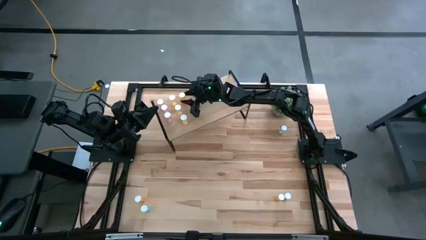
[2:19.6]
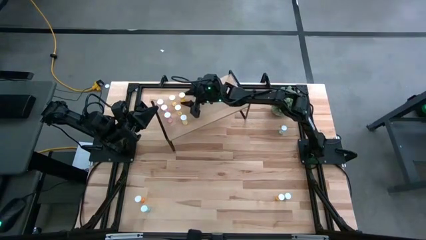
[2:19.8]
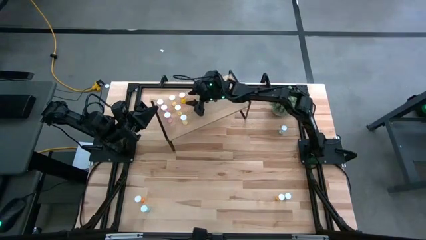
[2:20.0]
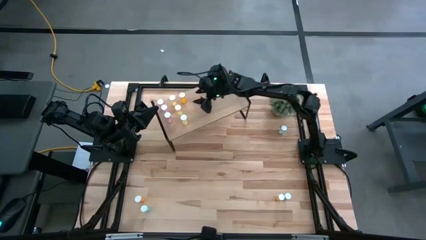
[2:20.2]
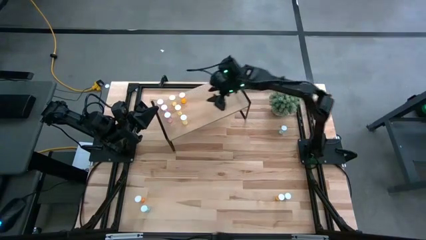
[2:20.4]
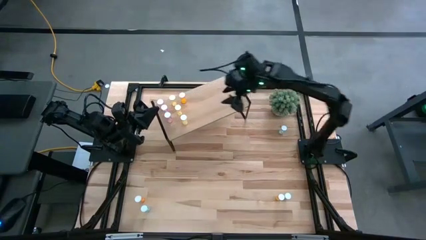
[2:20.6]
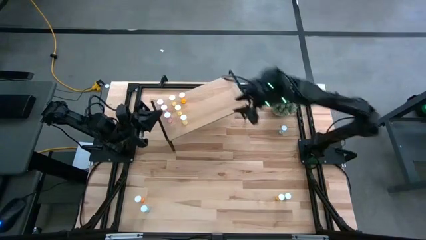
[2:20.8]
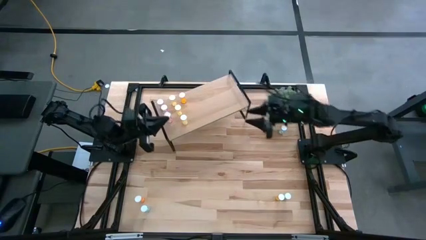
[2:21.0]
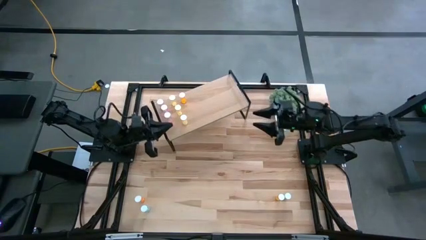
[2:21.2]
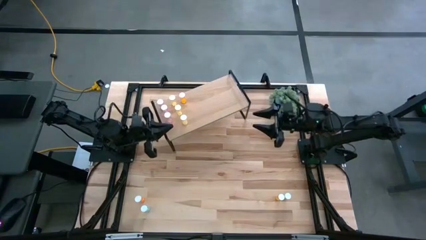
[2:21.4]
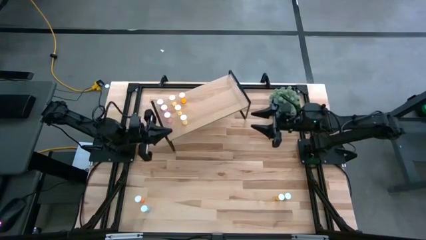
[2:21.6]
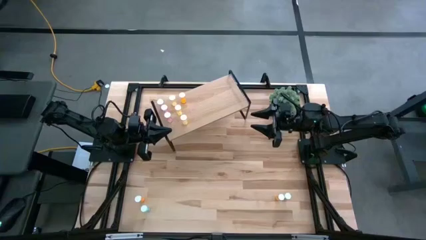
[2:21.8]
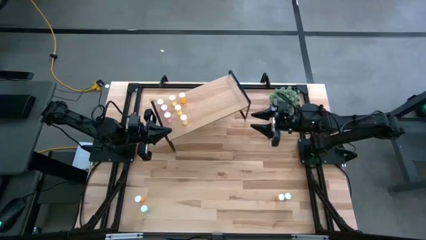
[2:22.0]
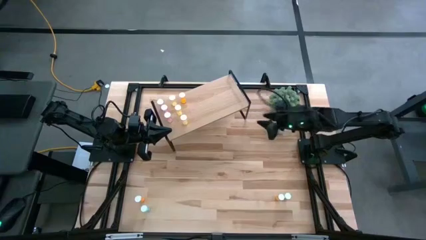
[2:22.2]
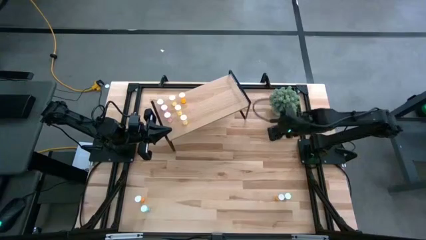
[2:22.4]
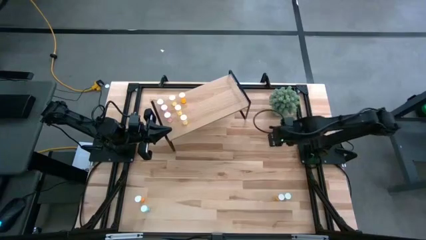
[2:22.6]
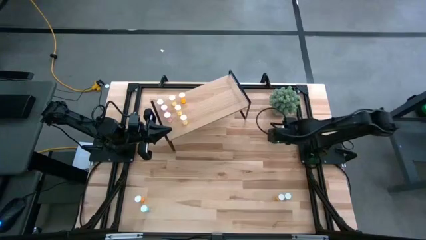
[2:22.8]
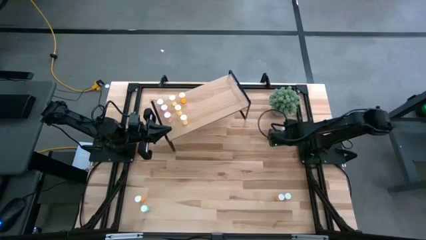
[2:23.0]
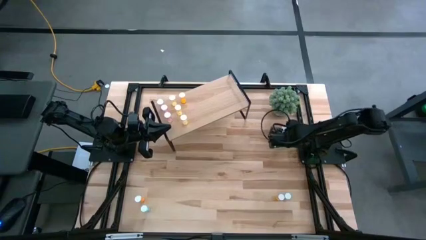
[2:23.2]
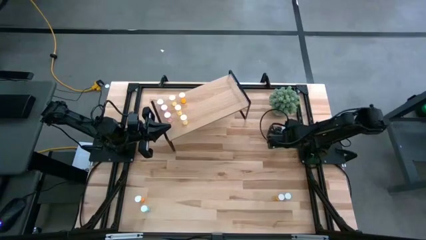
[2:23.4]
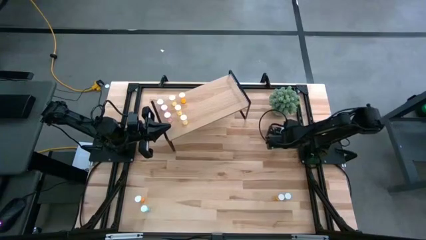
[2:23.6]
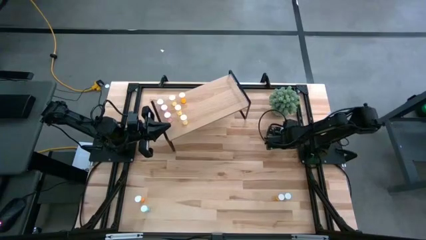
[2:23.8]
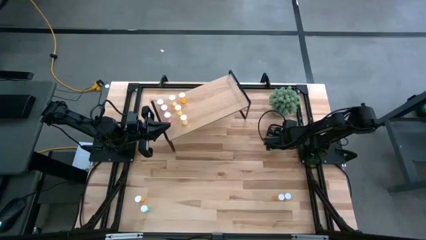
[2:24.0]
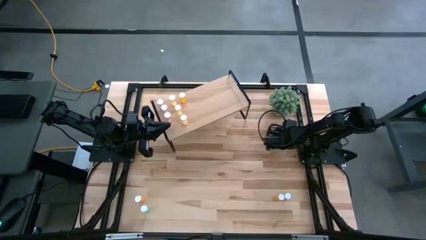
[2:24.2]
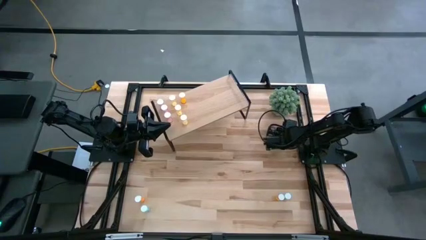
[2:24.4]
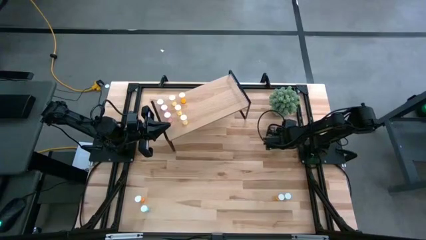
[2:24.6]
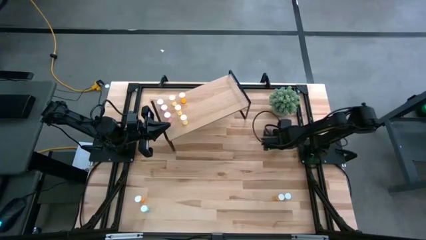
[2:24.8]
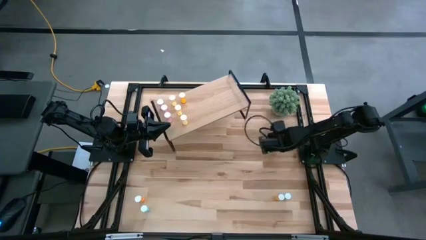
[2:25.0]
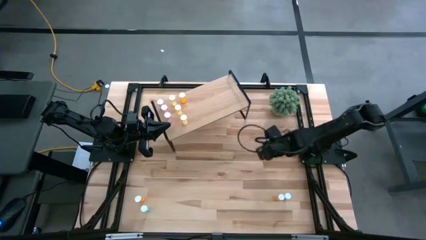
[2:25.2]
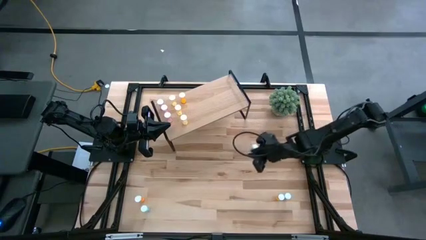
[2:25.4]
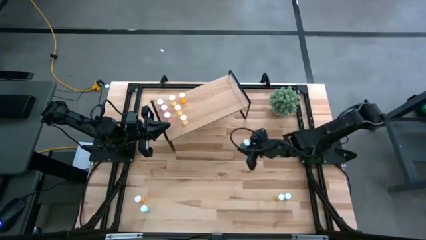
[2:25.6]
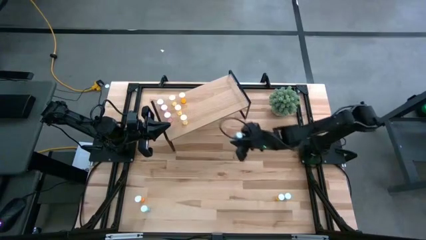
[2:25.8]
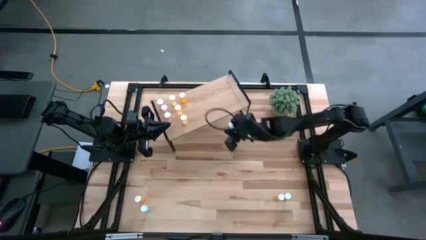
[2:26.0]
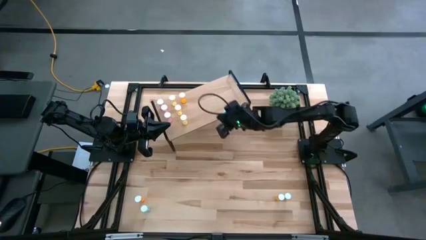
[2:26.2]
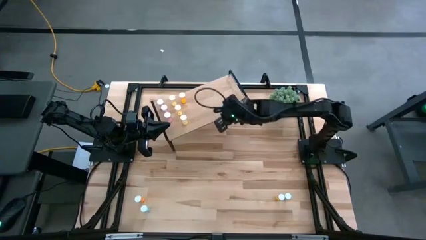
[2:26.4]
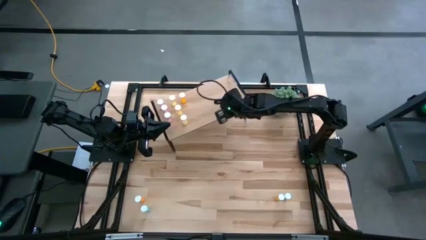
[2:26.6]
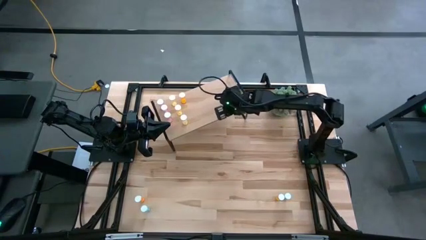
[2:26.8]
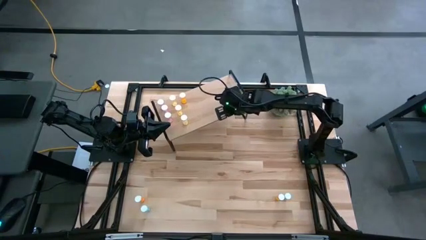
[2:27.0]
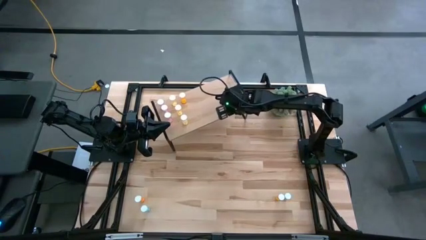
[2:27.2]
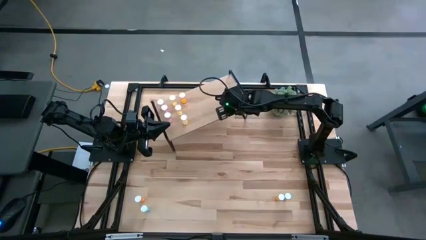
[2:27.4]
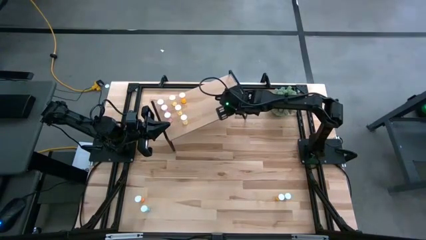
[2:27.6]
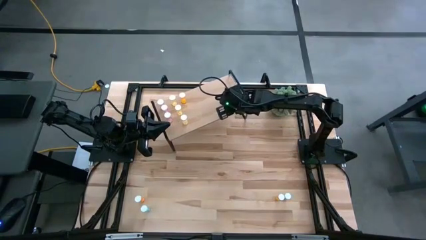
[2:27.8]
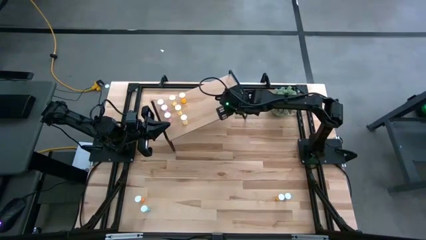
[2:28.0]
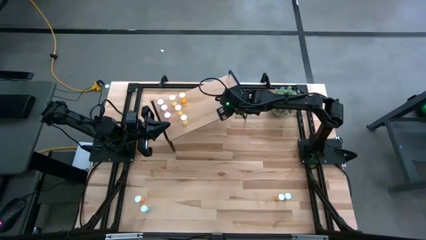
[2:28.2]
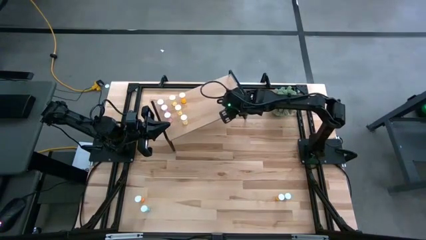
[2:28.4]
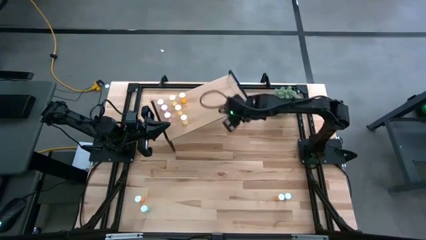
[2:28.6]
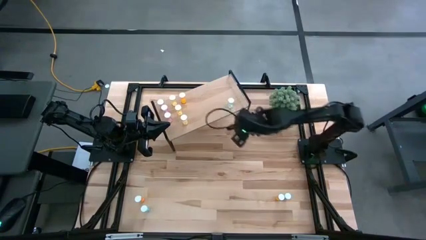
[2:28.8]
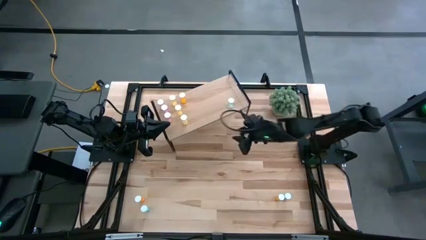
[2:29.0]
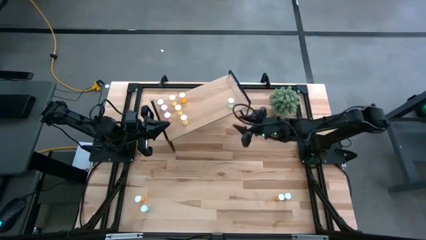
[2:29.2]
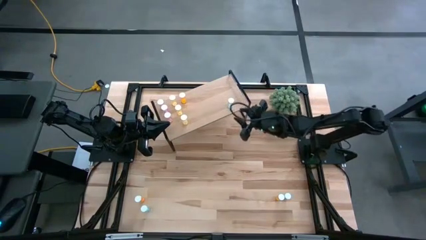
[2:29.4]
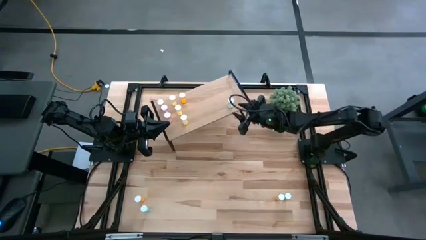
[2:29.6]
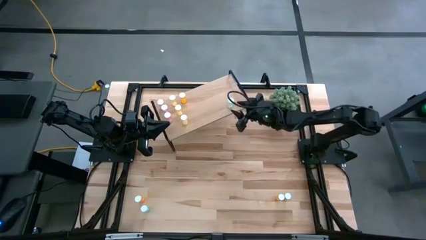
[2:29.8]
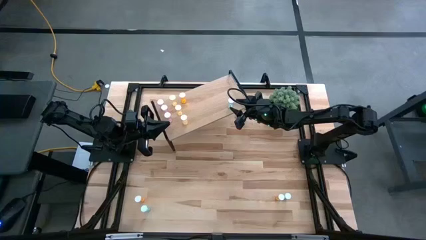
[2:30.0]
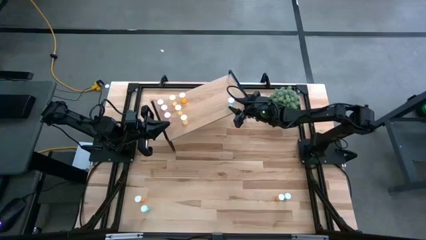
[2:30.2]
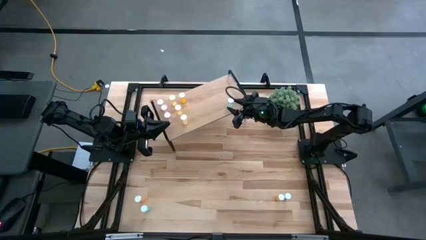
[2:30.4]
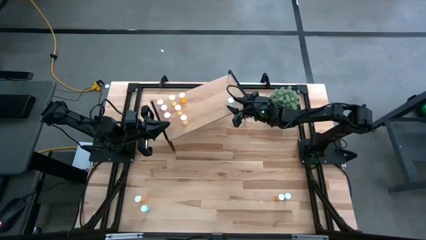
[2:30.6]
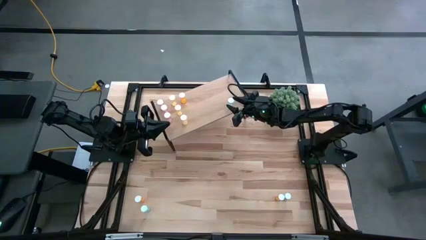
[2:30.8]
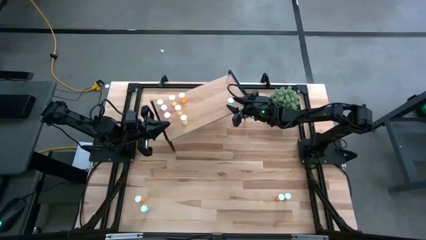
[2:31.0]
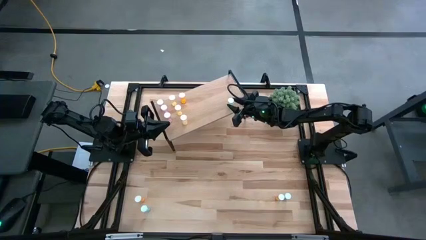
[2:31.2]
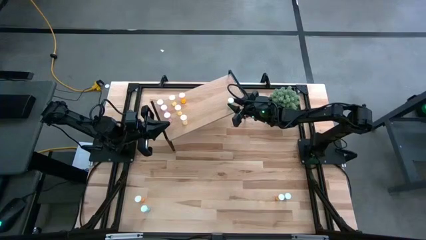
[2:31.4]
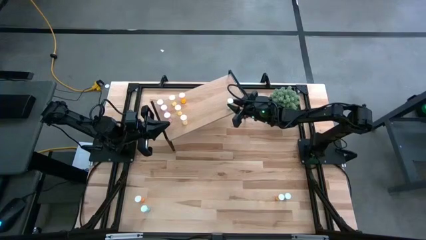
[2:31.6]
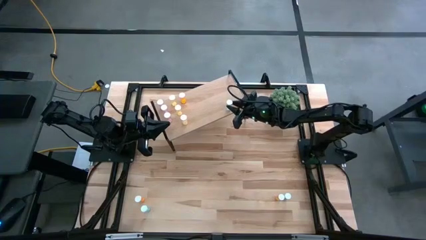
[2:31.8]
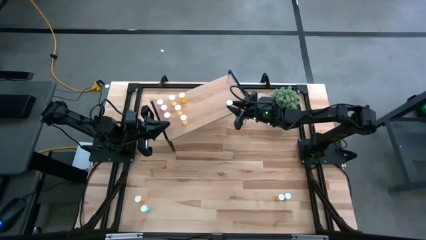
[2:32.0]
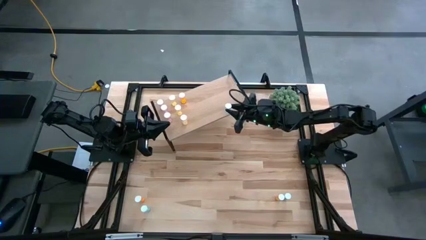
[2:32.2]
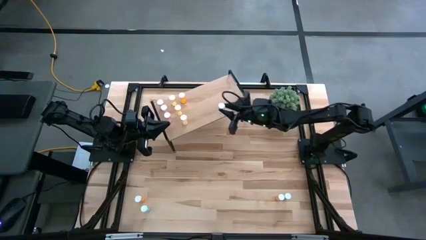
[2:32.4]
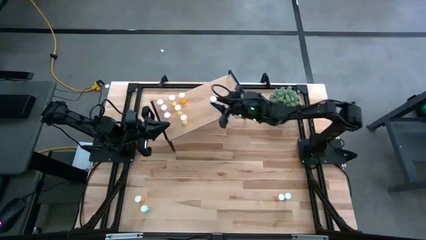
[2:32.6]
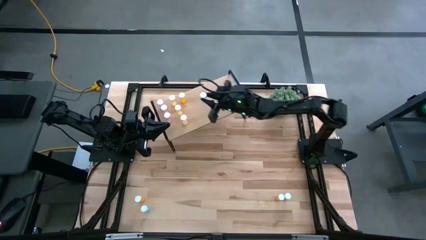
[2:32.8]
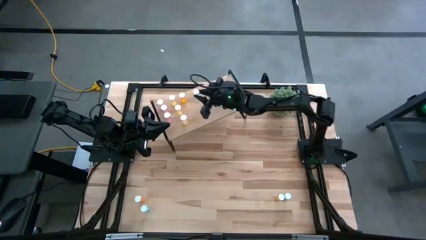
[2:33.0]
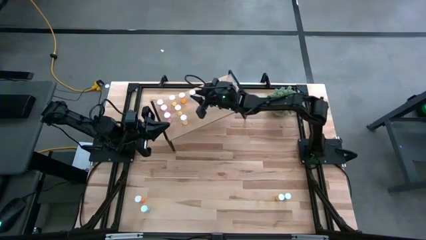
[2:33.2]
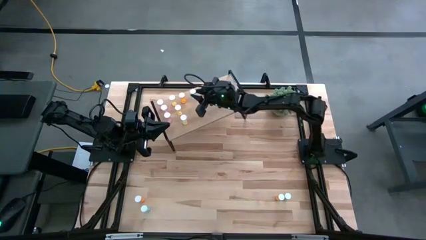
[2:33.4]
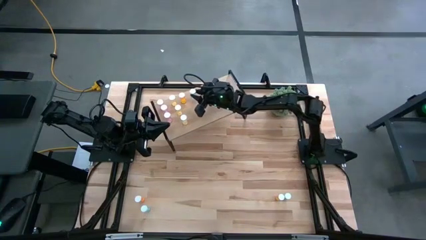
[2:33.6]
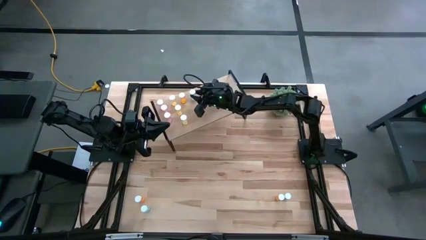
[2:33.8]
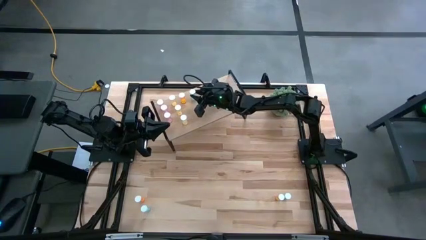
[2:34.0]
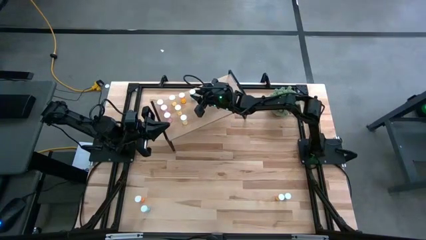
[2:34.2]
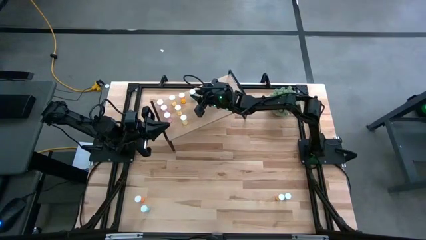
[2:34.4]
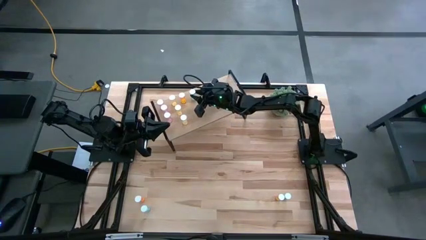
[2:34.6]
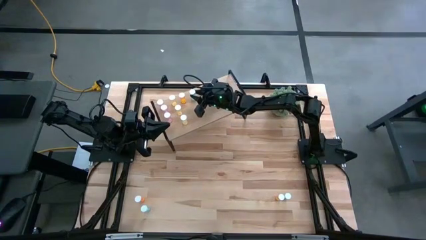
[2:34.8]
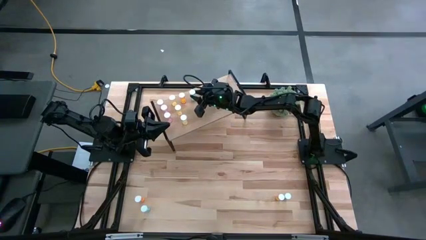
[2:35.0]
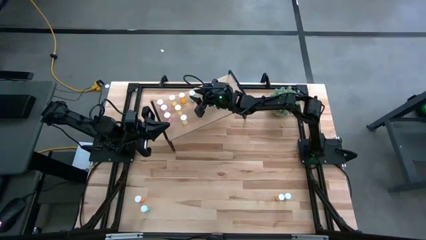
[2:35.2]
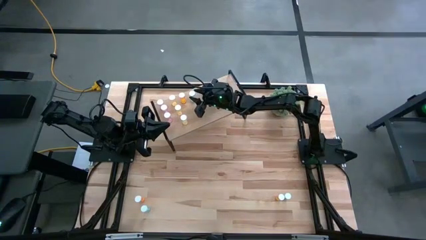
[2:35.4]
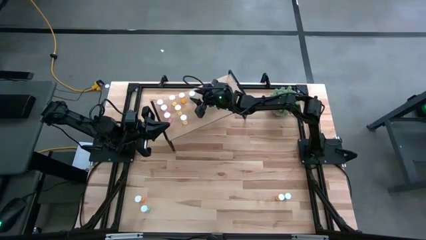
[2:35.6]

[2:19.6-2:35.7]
Task: Pick and place medicine bottles onto shelf by color
Put the top right blue pill bottle on the shelf

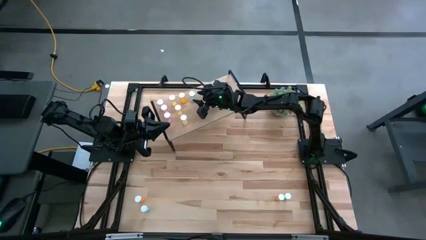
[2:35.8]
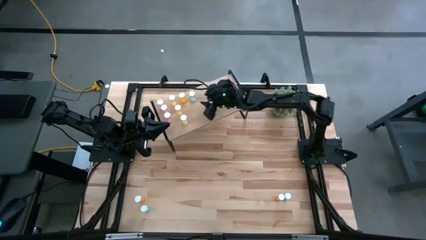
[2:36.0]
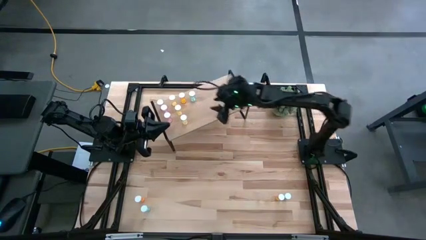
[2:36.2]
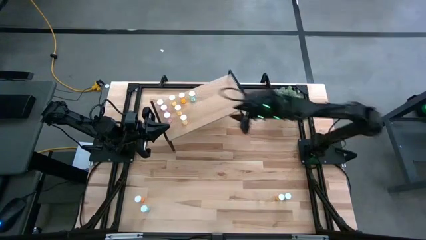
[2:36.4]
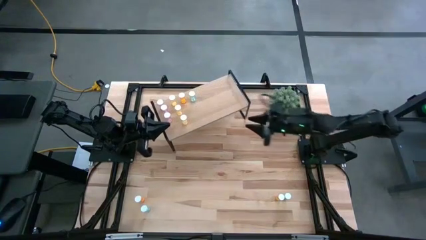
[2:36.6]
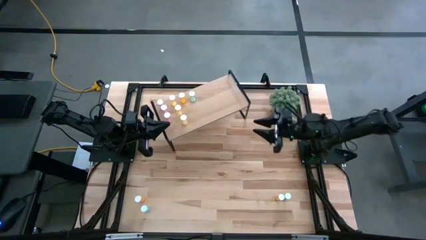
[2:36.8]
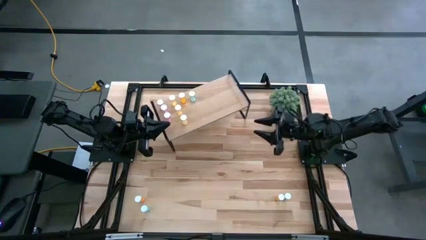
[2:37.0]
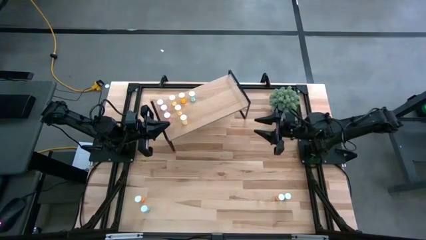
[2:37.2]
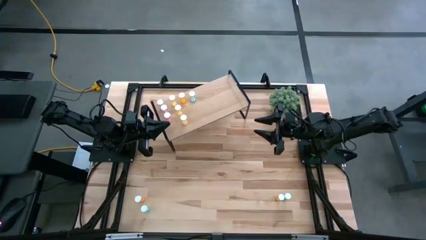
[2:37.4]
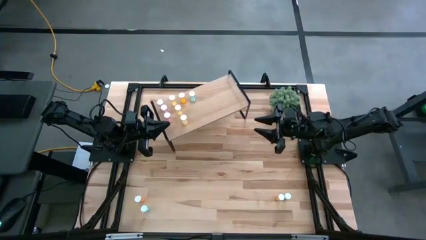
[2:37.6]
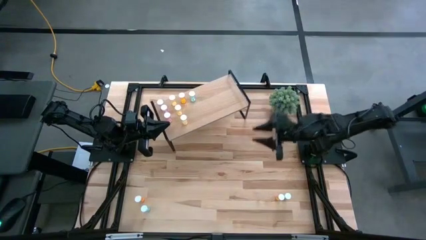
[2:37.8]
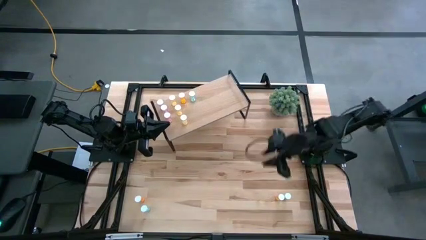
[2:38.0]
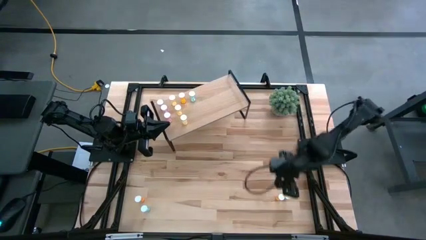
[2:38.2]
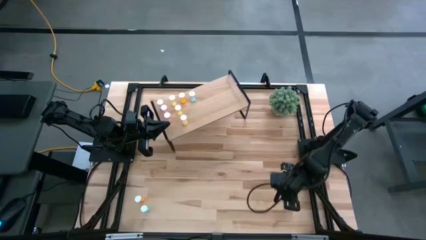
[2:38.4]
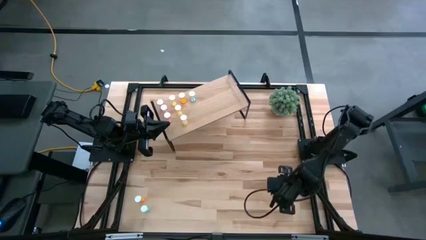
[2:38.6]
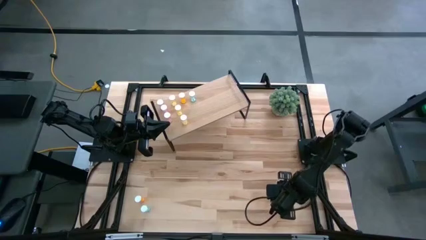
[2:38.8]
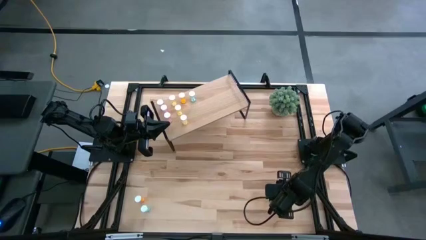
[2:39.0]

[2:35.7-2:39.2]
Put the right orange pill bottle on the shelf aligned with the other orange pill bottle
